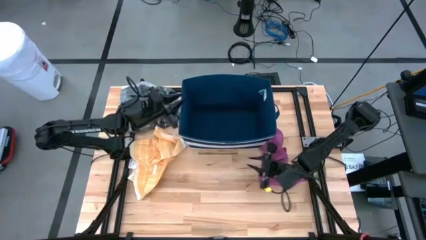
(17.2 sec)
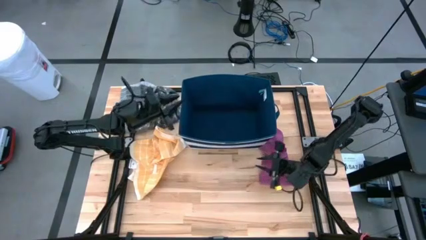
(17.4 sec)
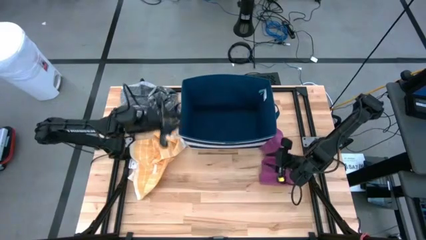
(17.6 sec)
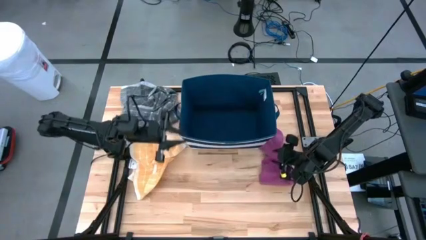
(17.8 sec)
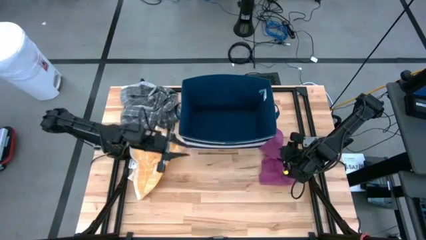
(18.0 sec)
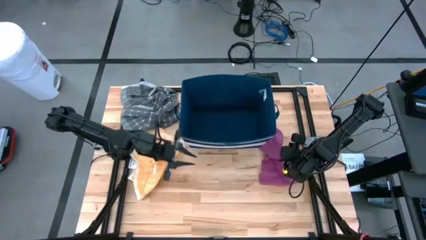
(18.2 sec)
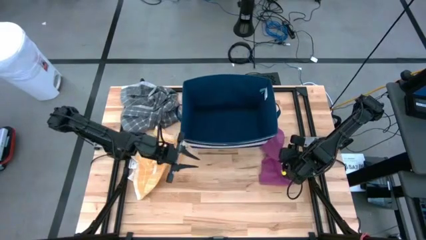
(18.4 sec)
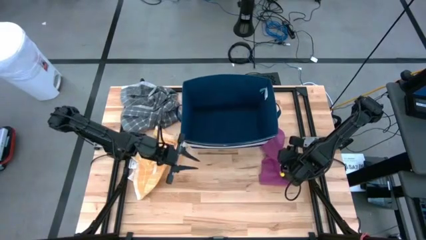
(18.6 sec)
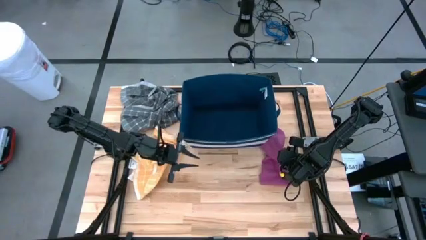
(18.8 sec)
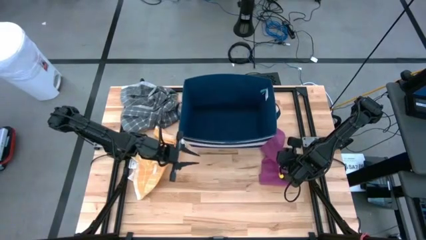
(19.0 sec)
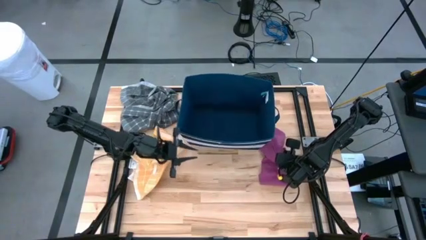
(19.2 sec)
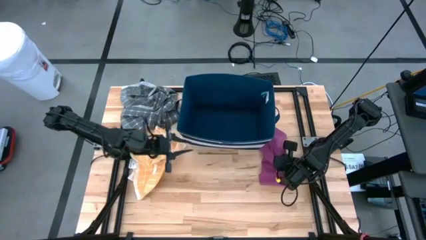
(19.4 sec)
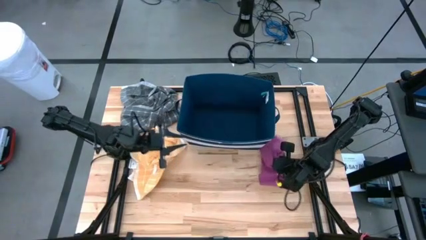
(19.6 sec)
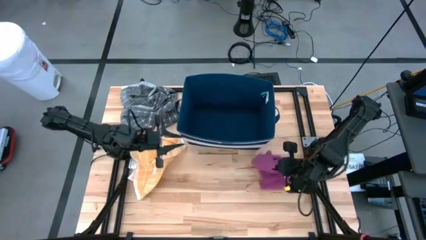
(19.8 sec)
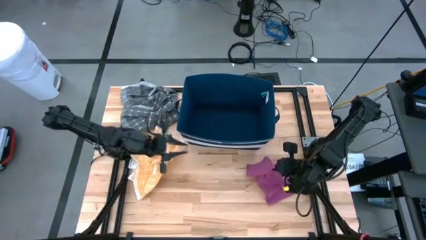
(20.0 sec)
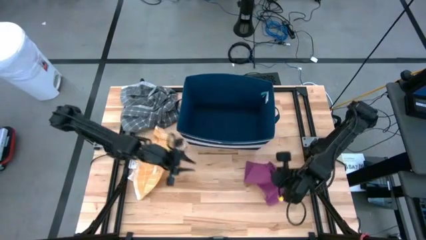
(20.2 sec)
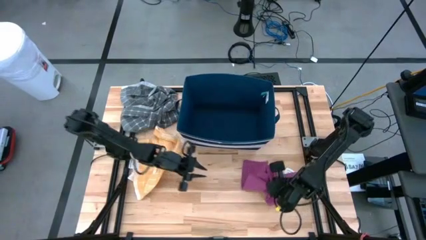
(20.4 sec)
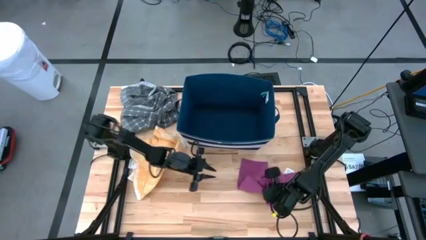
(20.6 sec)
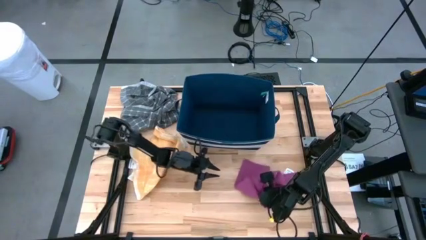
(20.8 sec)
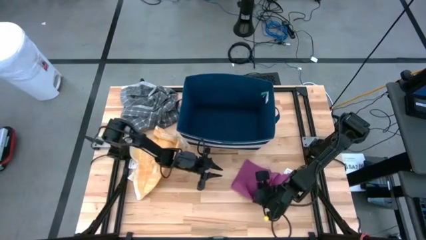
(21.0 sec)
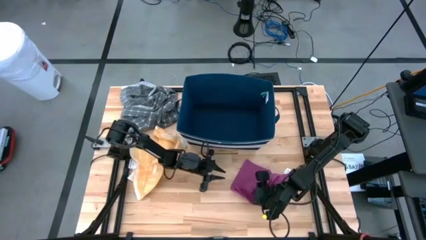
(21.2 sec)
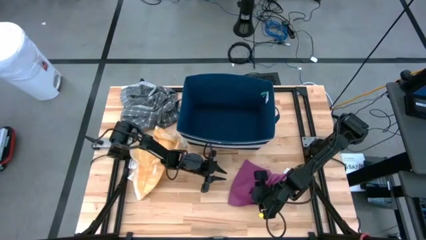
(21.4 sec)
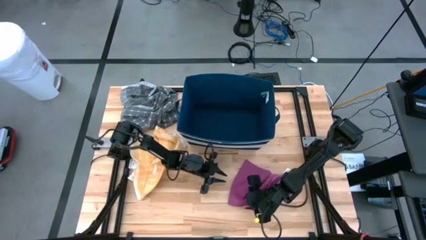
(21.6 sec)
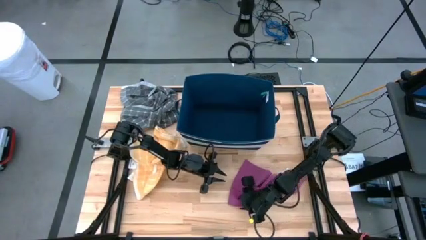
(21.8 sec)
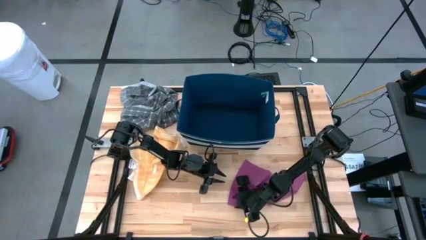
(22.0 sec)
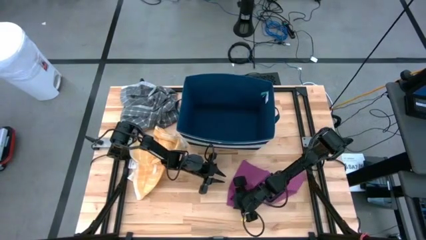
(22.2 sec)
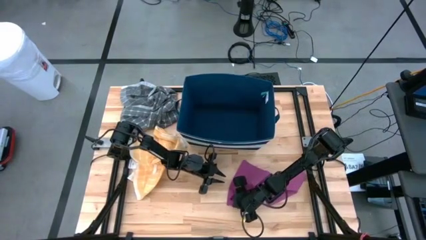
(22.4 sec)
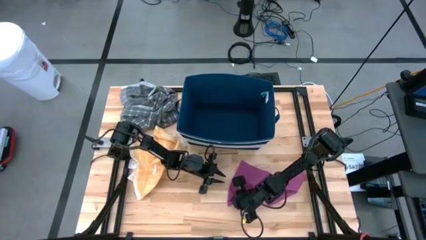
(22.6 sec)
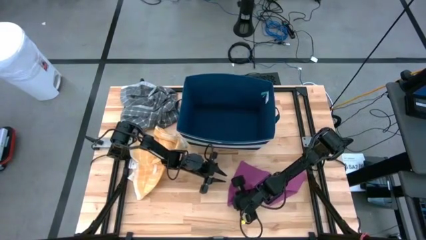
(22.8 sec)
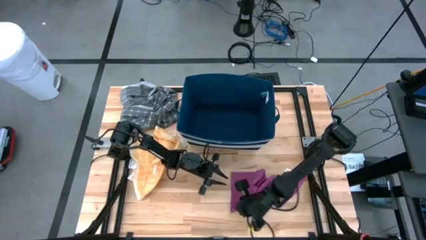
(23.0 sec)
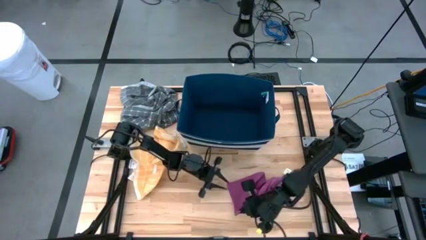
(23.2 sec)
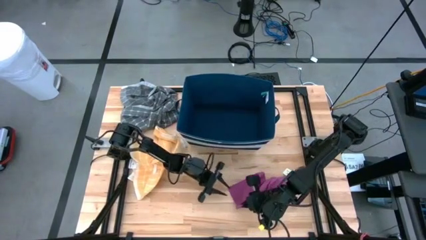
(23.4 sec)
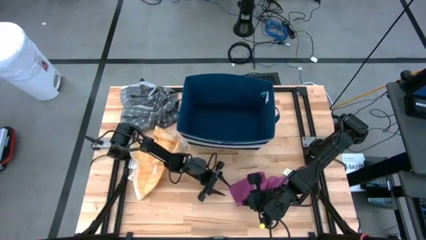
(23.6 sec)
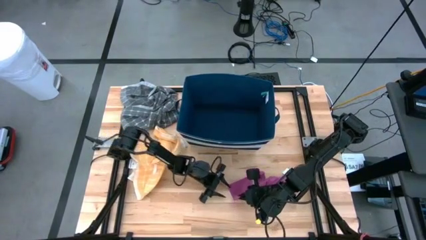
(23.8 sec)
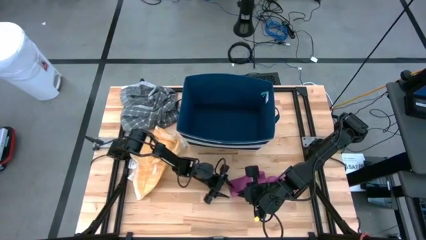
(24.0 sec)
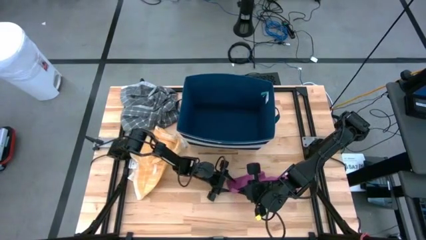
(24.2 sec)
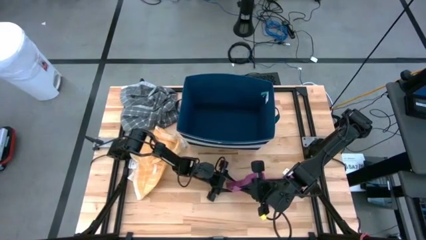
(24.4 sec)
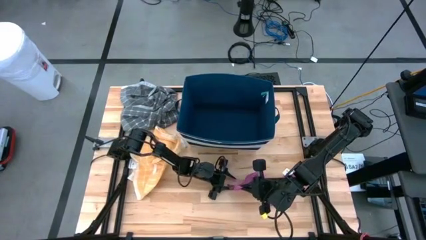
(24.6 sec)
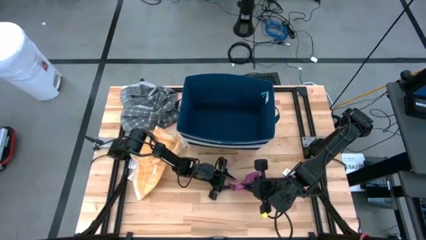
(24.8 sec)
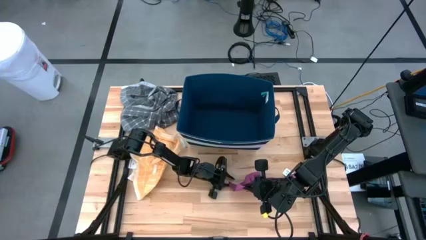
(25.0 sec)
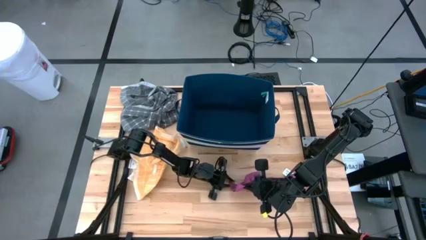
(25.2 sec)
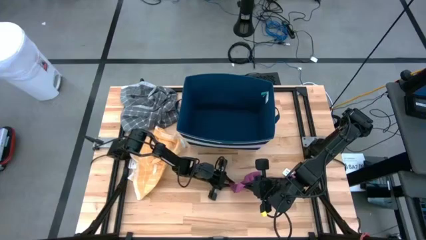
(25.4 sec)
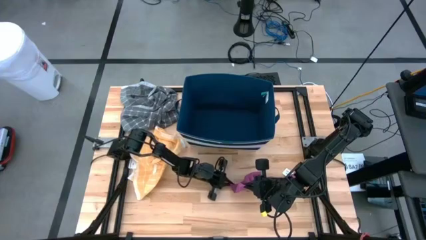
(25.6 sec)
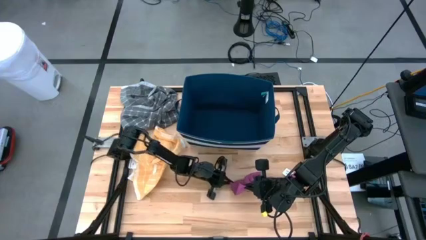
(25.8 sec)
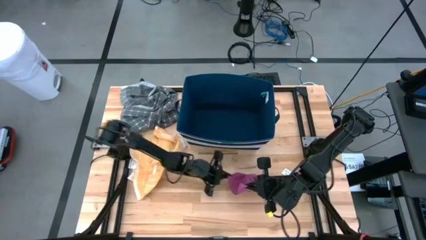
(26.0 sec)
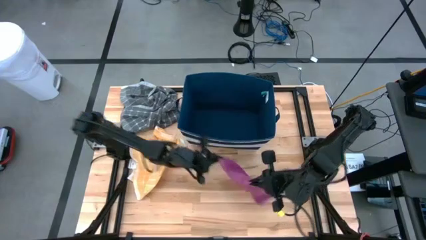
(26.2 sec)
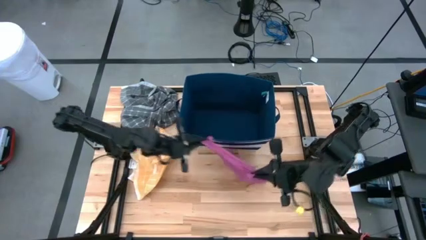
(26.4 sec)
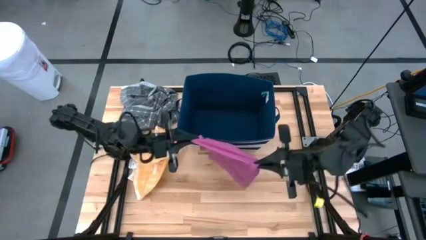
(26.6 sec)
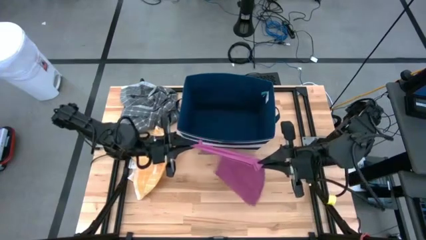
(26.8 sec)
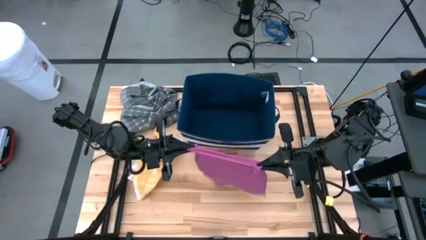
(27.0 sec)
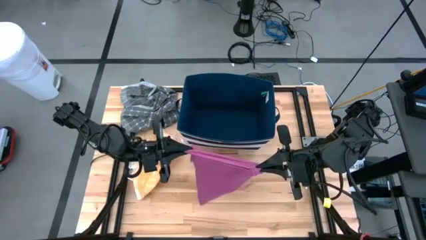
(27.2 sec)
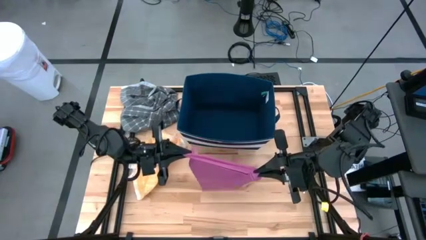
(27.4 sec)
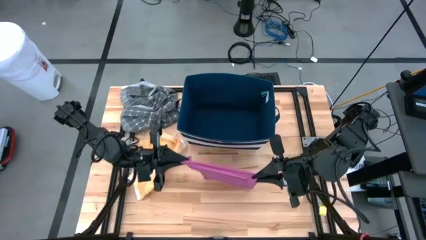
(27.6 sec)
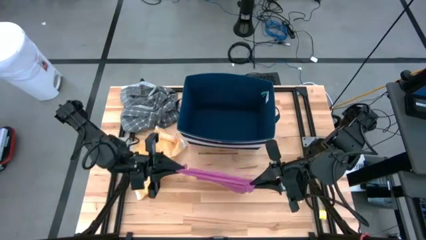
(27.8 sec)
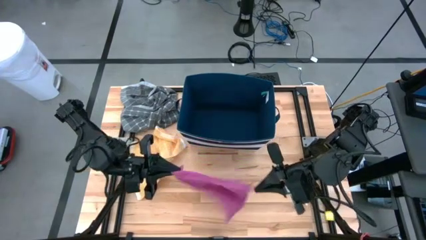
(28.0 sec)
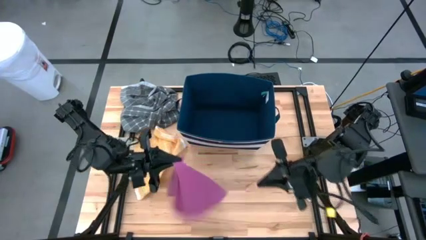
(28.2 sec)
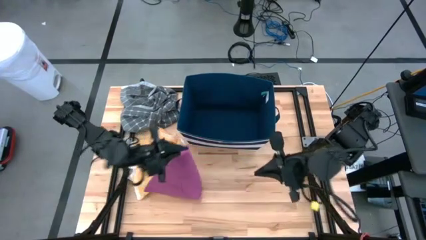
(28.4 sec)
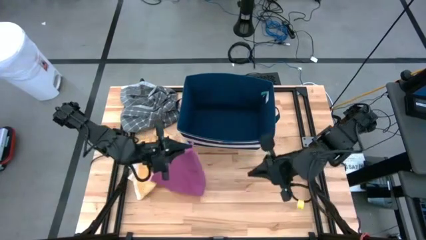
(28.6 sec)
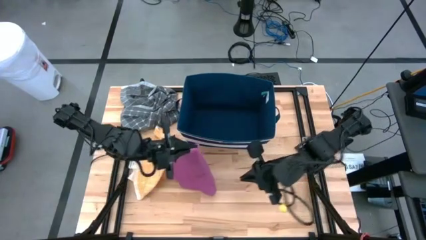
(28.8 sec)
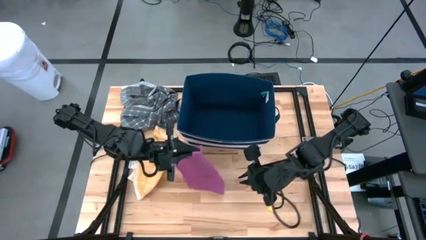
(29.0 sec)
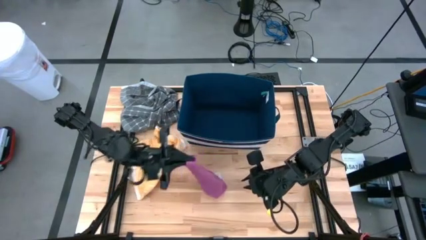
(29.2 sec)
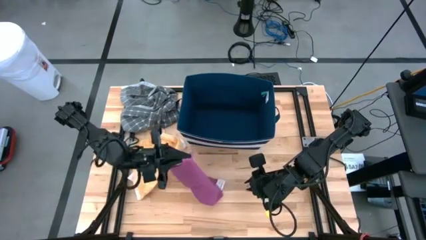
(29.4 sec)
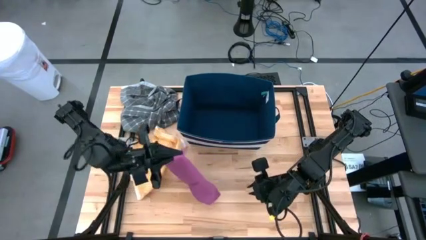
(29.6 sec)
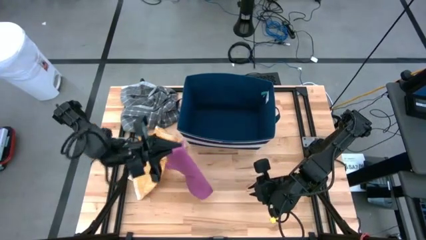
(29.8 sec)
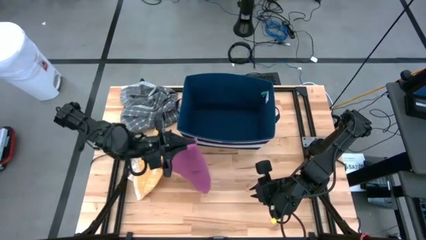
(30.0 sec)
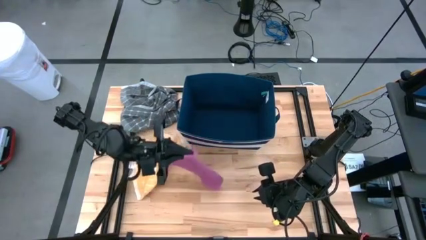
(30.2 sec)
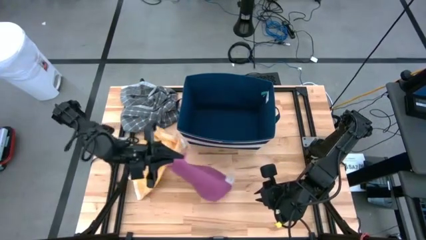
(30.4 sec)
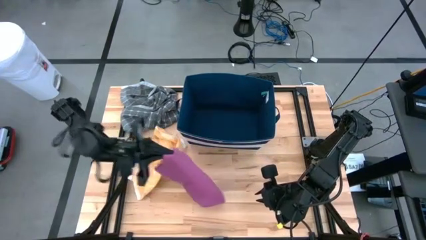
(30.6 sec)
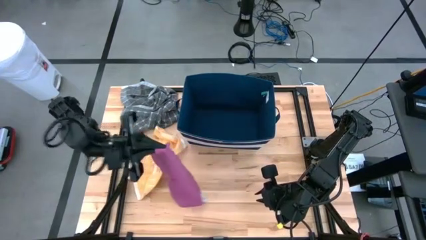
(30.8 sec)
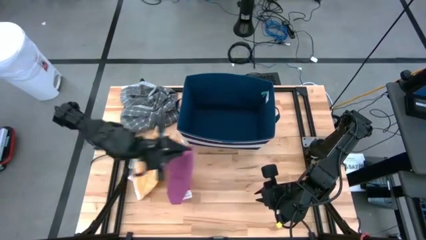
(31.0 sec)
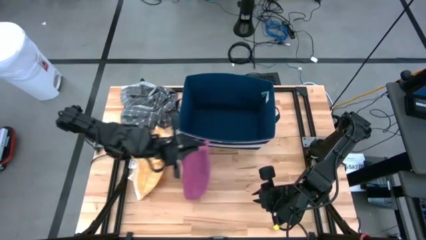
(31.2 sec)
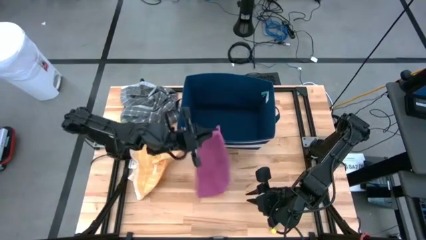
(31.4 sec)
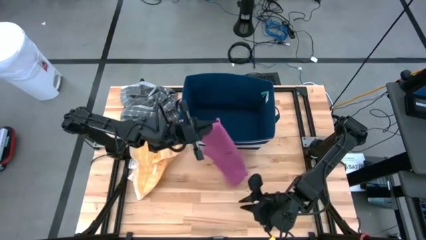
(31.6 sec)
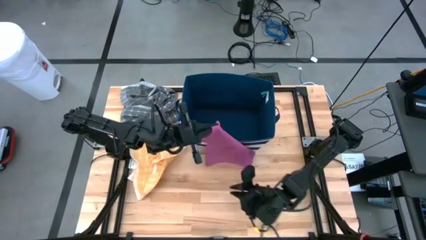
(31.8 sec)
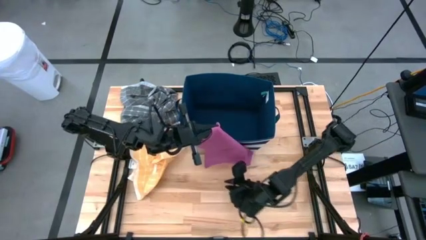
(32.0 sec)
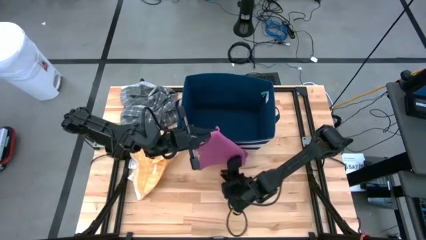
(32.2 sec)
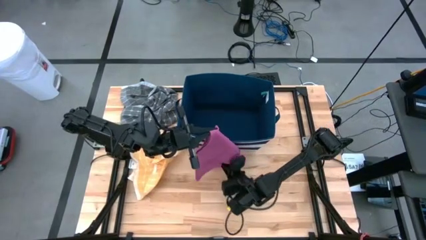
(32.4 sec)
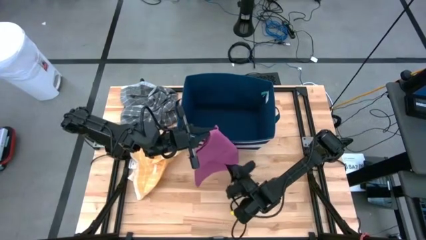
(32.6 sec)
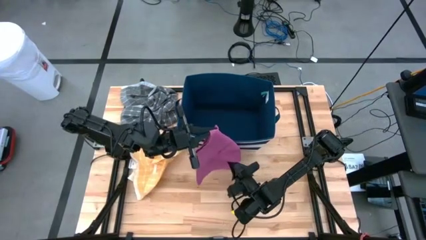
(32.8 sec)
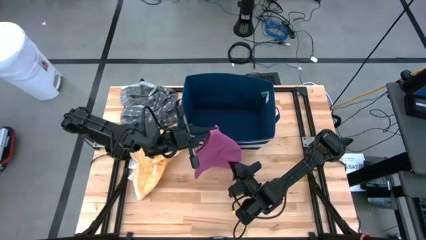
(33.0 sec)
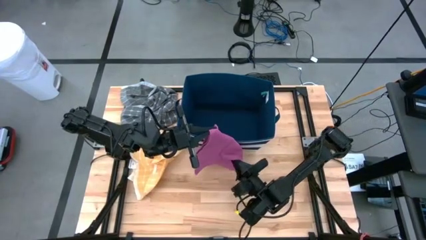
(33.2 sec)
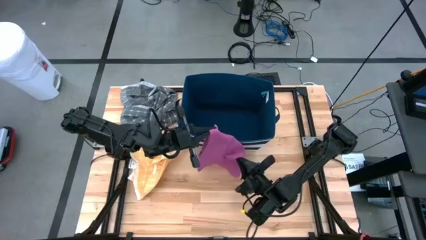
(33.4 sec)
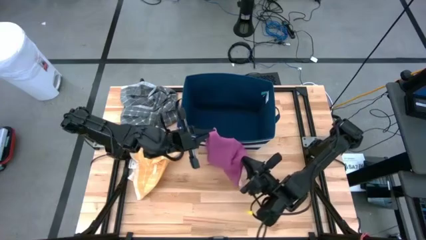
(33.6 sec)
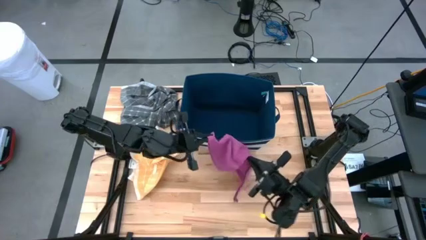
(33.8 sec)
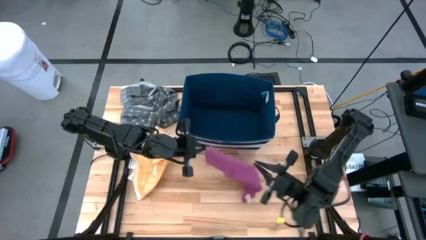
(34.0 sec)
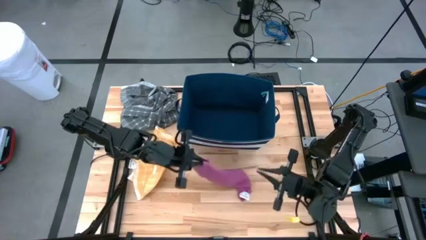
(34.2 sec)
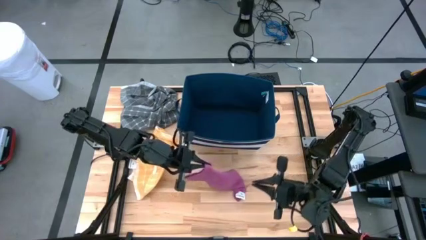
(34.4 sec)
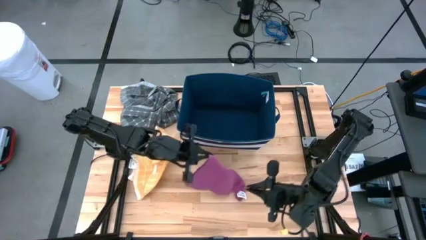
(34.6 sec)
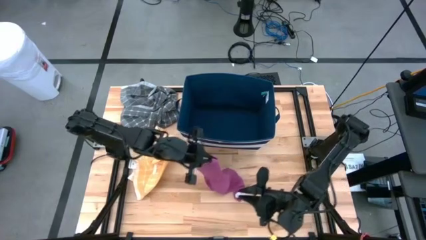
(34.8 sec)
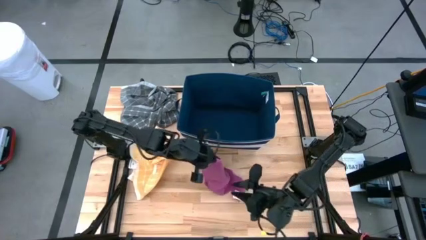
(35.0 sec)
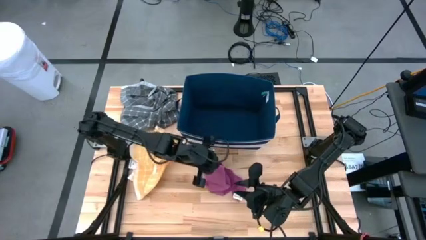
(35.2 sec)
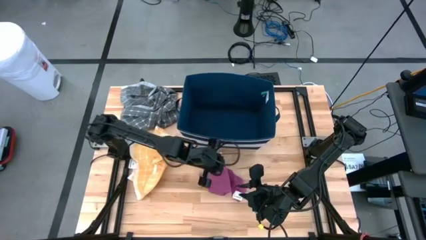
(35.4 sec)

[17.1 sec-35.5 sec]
Task: Fold towel
Fold the purple towel
